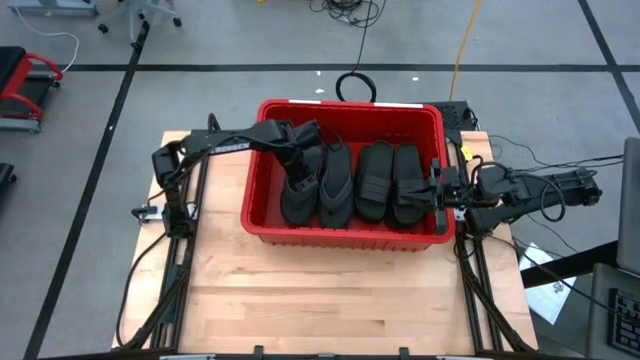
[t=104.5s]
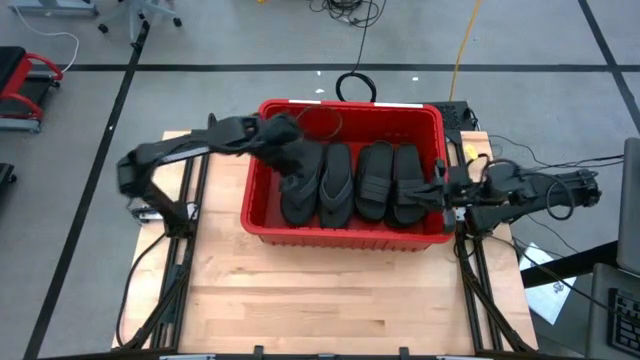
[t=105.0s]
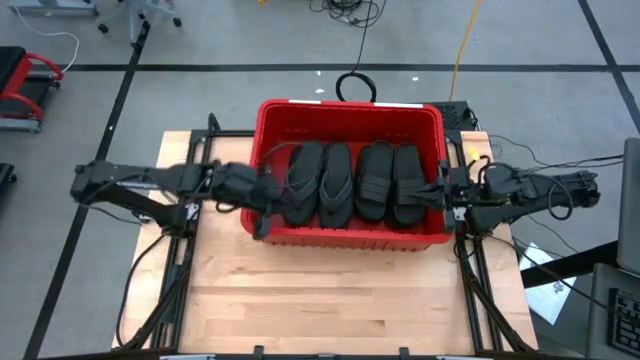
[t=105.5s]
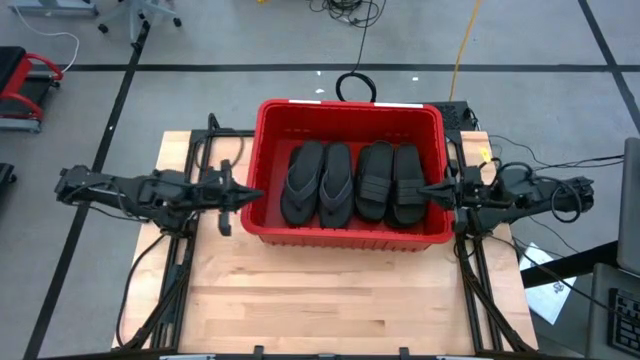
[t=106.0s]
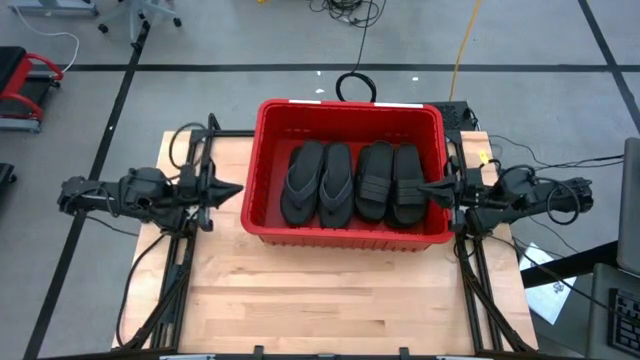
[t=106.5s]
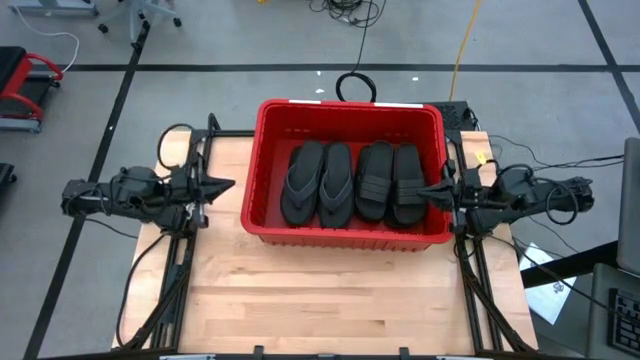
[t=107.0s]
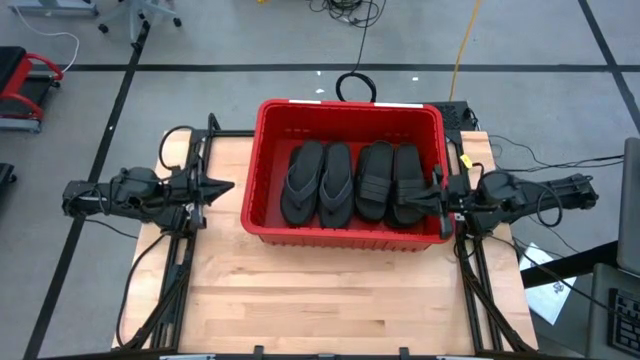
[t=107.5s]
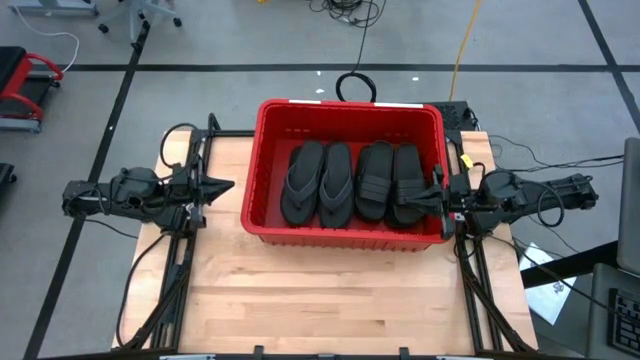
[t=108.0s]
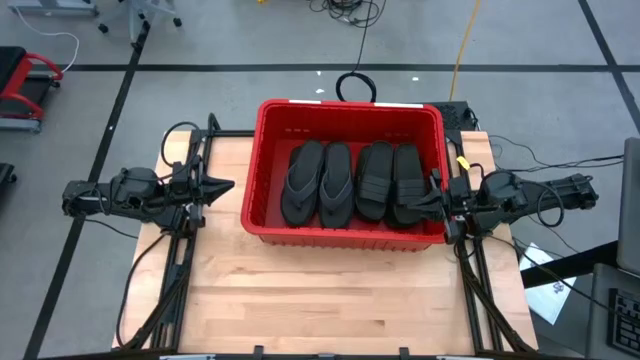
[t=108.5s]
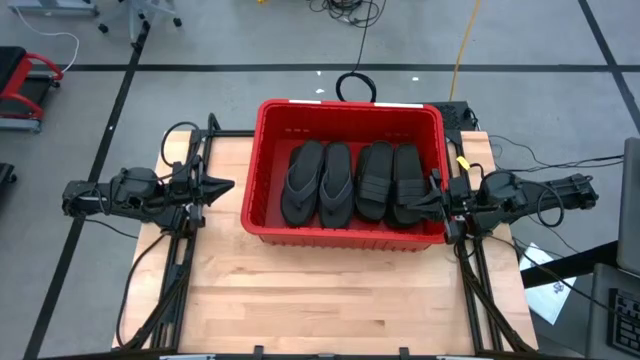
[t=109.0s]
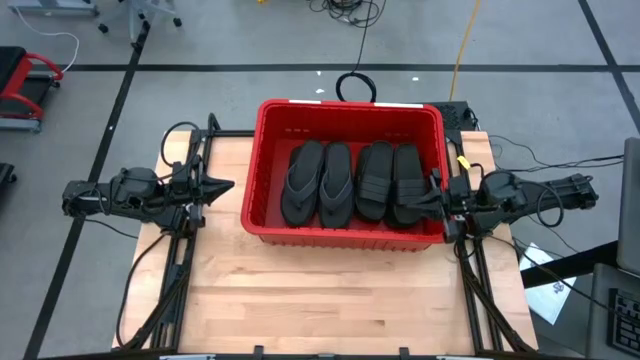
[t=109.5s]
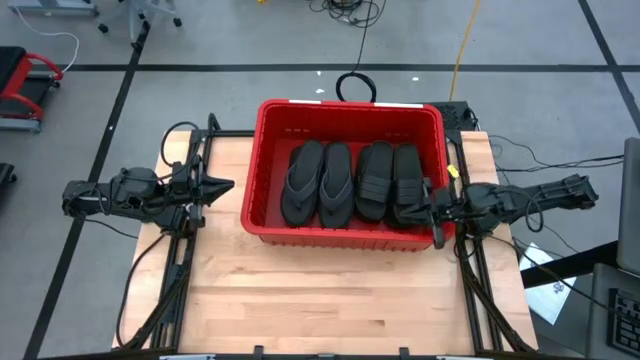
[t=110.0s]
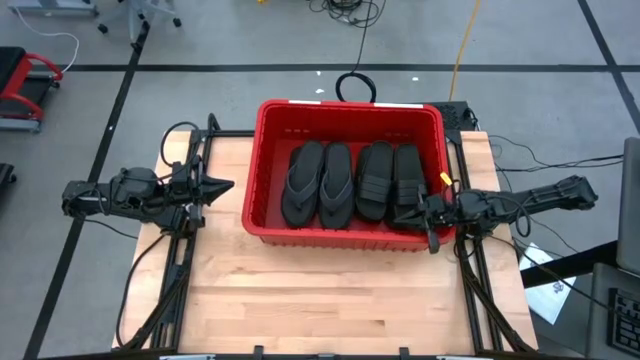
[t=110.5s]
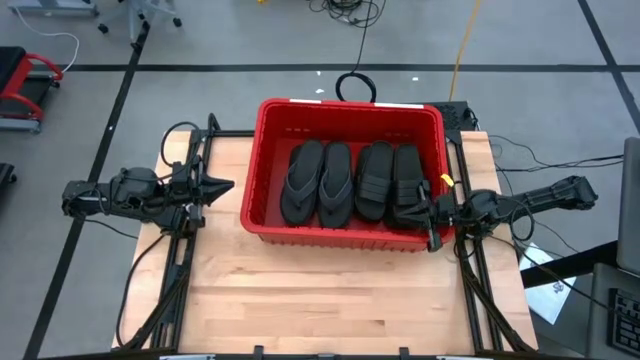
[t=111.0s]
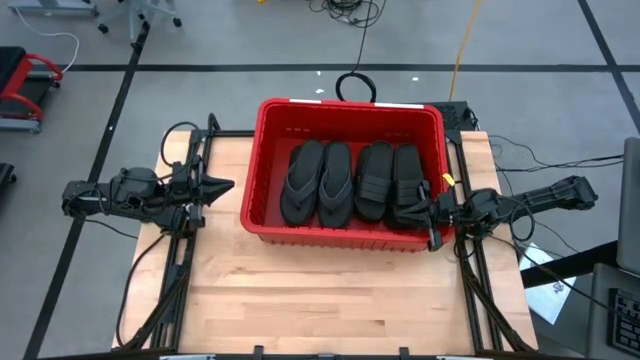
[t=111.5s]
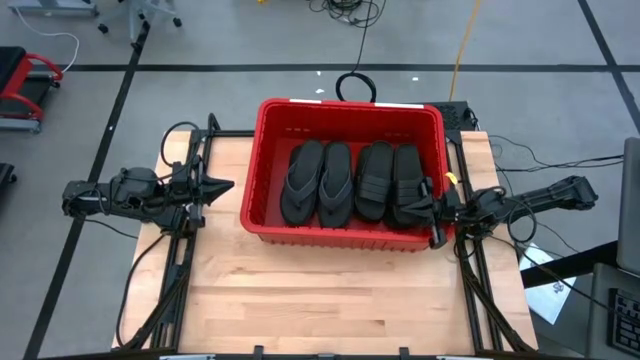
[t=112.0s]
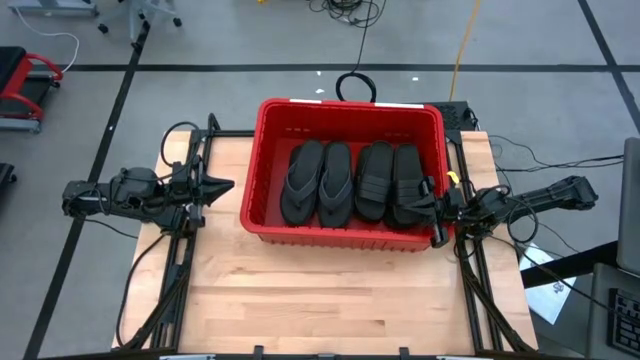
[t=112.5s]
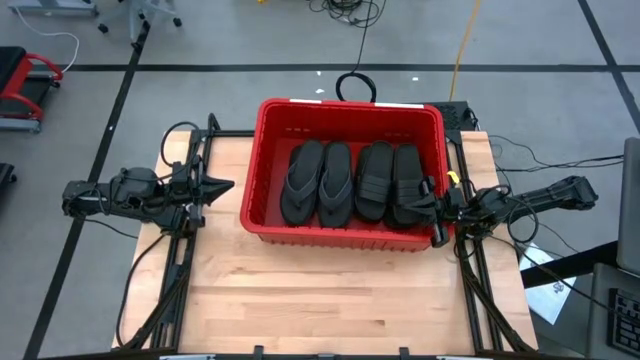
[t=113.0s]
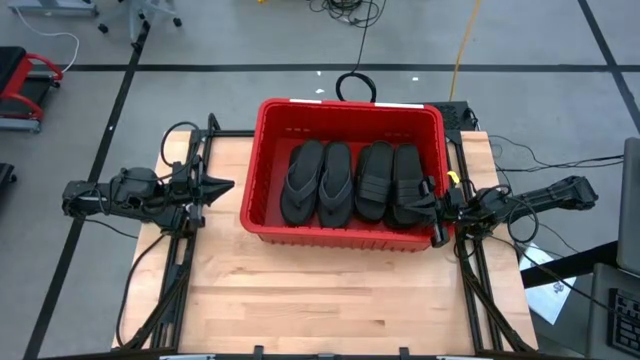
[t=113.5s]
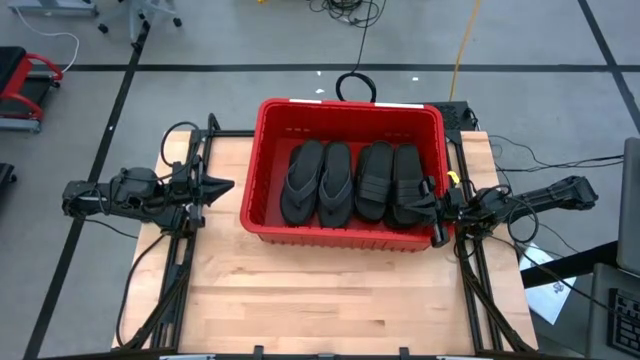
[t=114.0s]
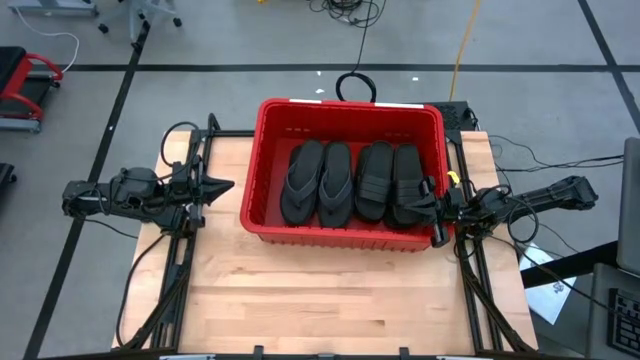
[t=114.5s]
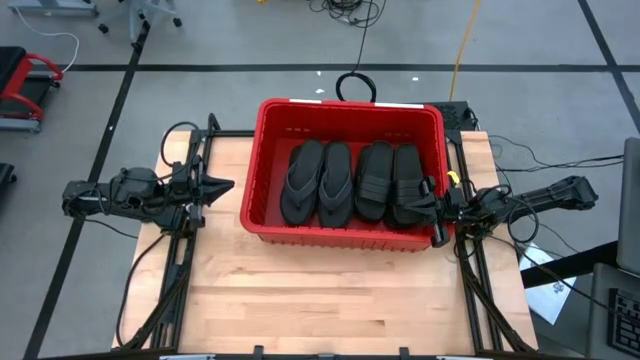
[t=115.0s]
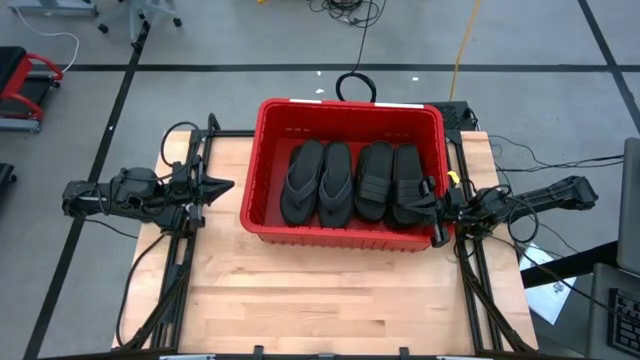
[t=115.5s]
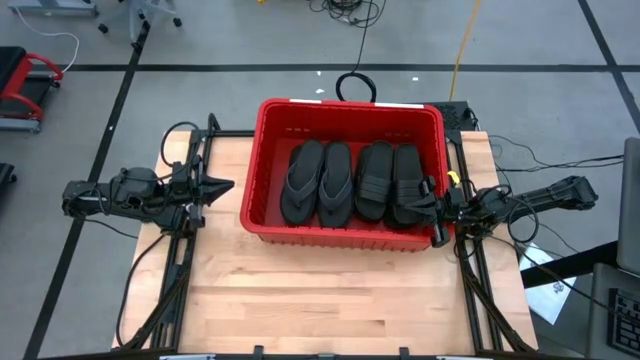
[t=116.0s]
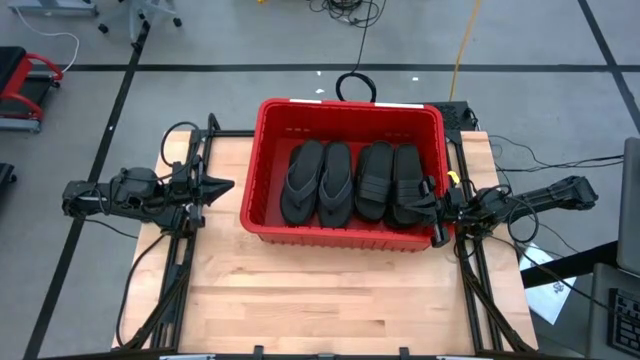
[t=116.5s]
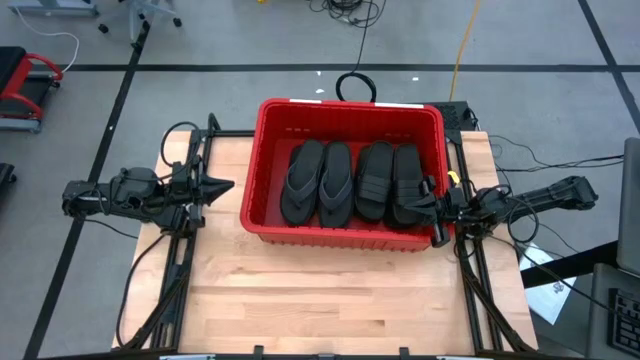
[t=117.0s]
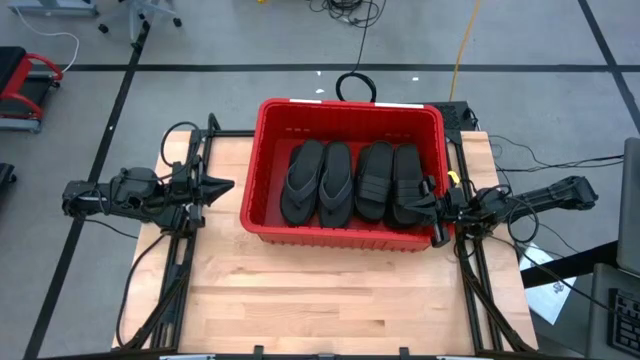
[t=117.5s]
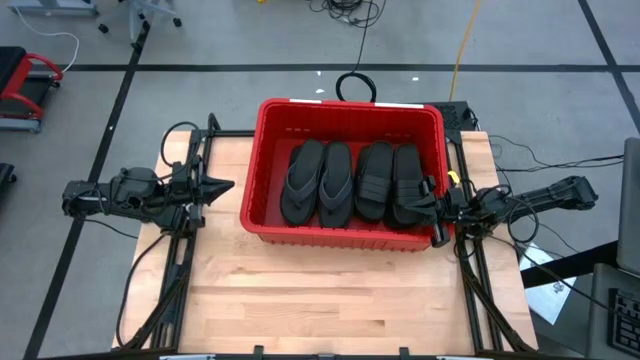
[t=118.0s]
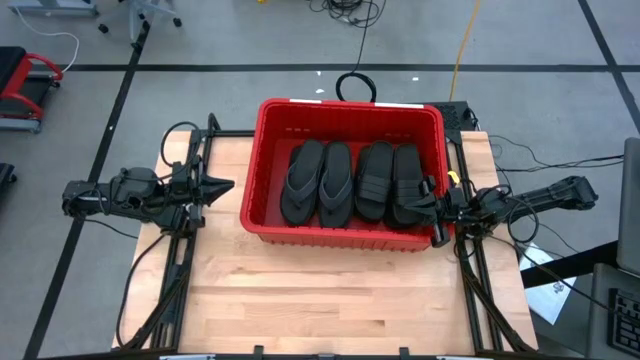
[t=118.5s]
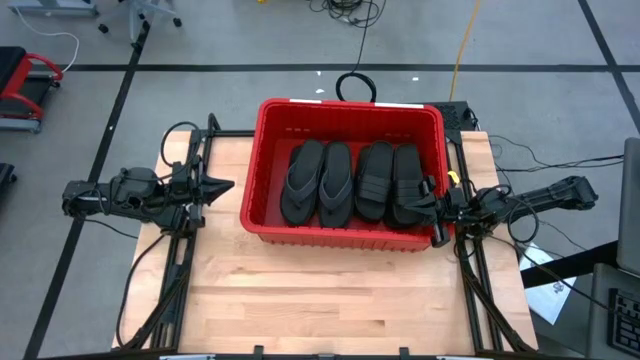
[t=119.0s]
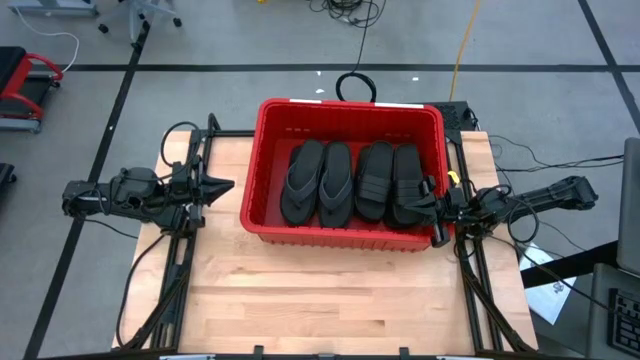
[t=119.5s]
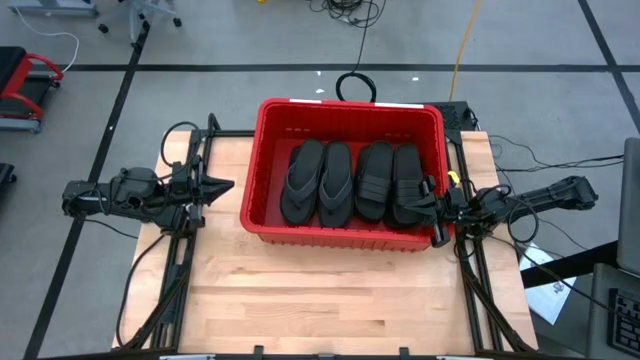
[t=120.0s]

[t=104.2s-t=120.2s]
Task: Pick and place slides into bin
Return to Home Position

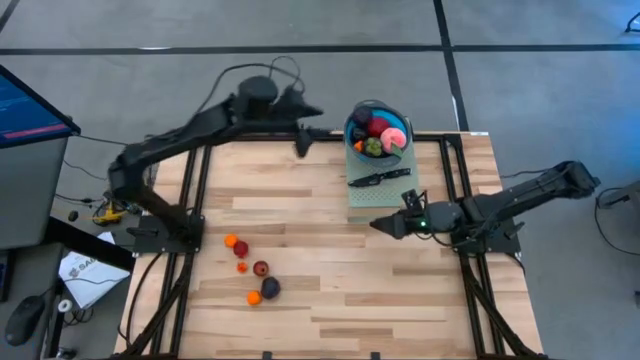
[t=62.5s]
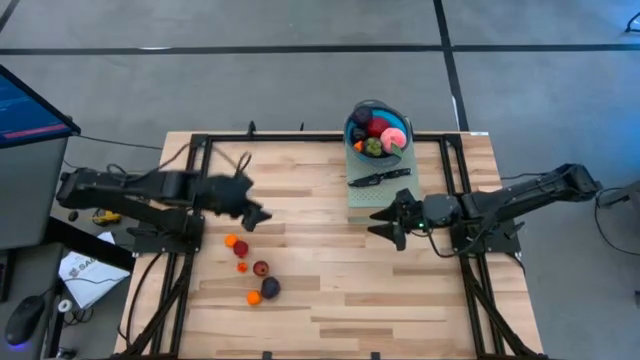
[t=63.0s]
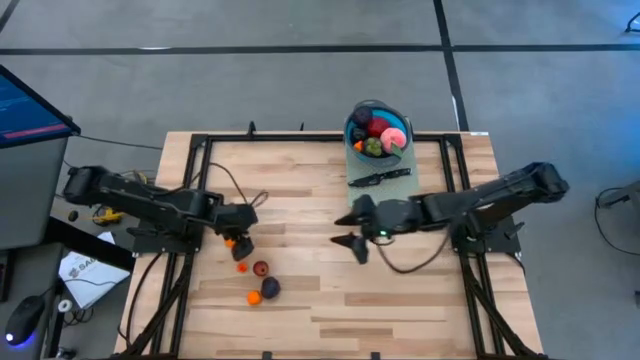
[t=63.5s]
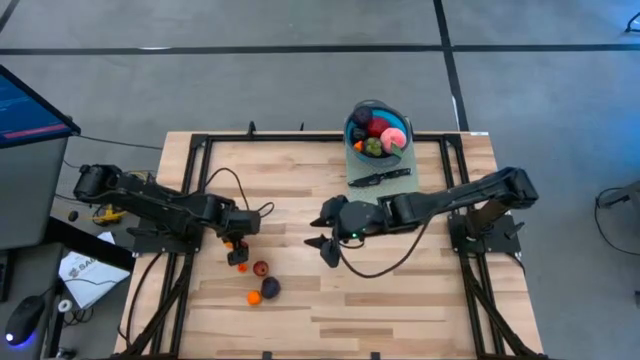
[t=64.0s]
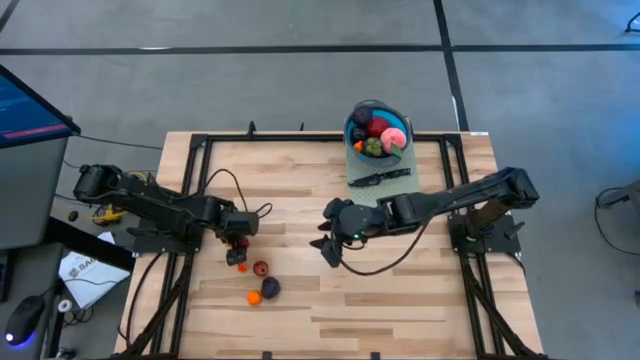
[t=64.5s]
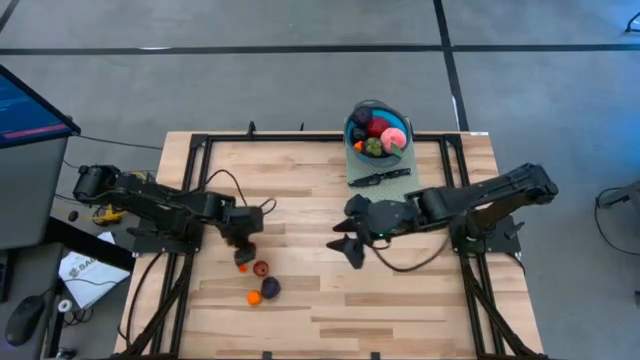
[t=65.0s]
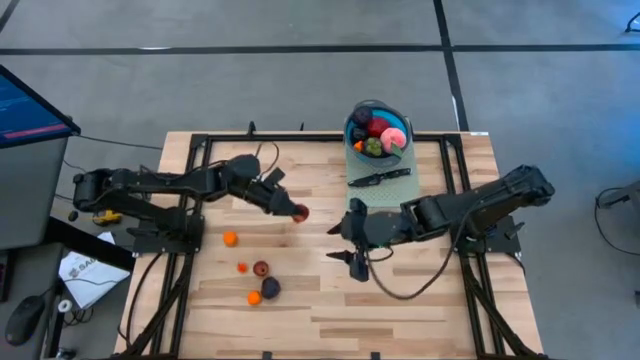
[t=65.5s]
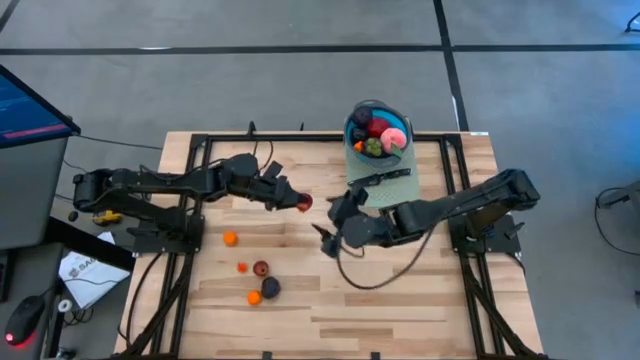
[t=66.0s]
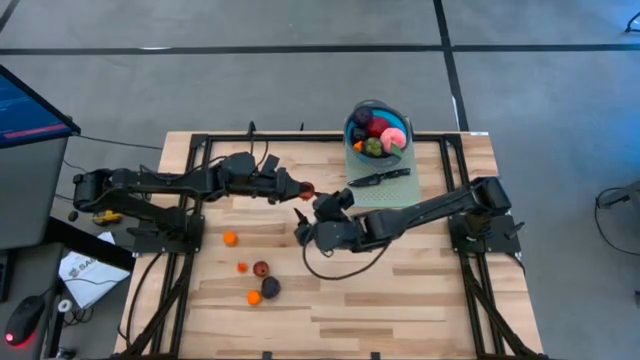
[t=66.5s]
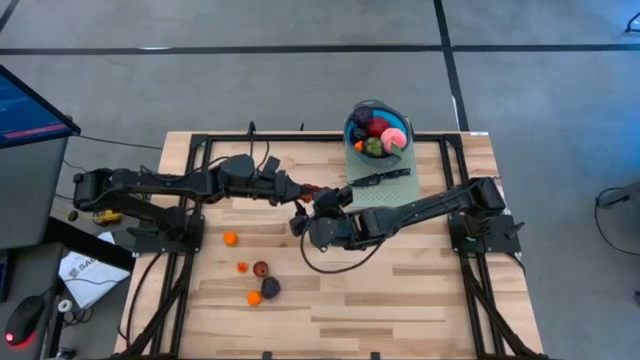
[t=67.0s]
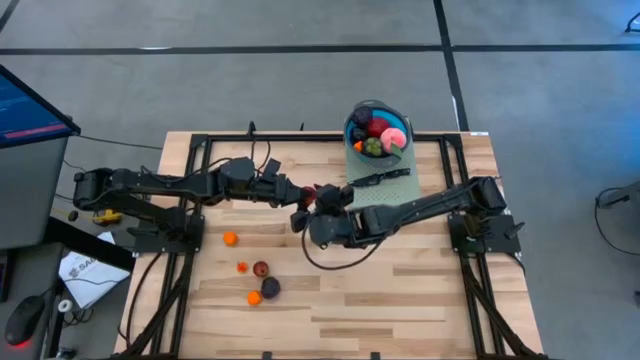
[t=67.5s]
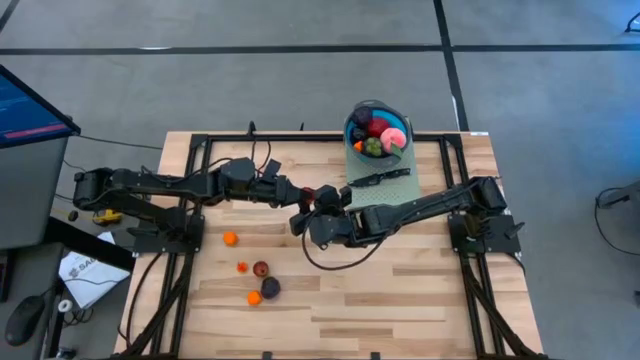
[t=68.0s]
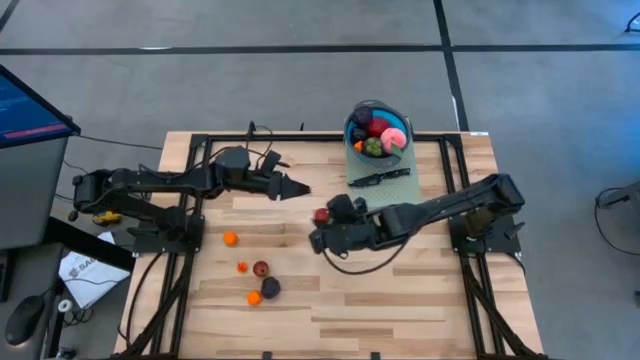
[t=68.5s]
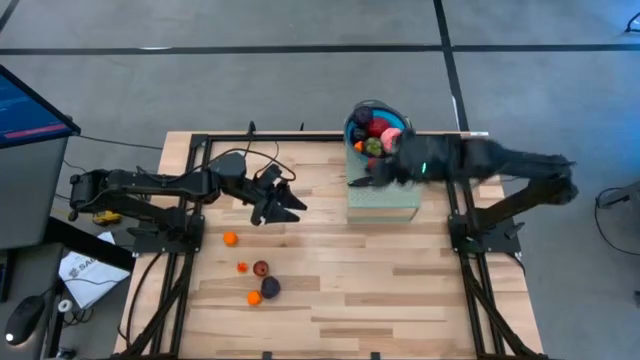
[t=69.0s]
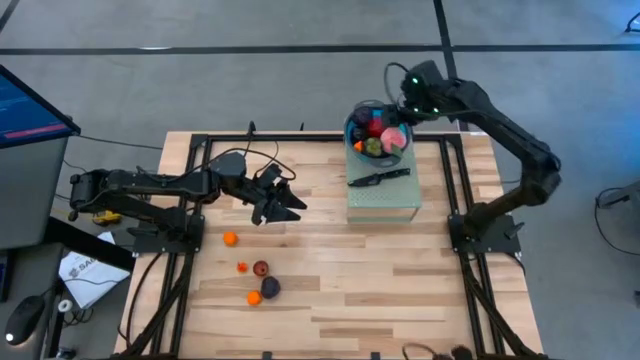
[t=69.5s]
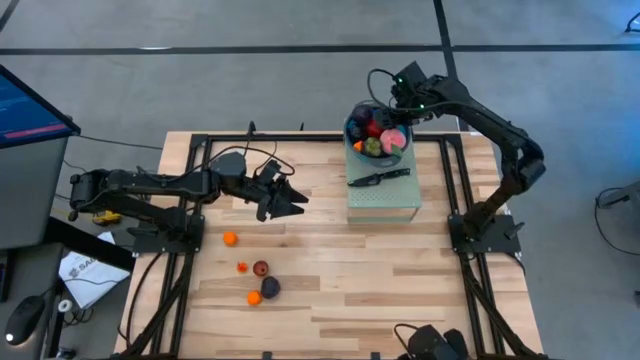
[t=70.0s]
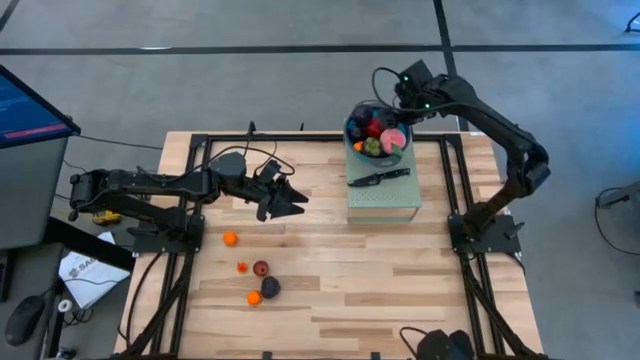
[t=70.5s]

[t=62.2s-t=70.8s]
Task: Pick & Place Fruit
Put the top red pomegranate into the blue strainer bowl on the shelf
